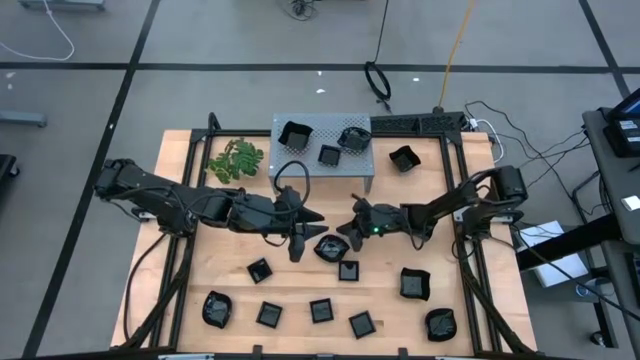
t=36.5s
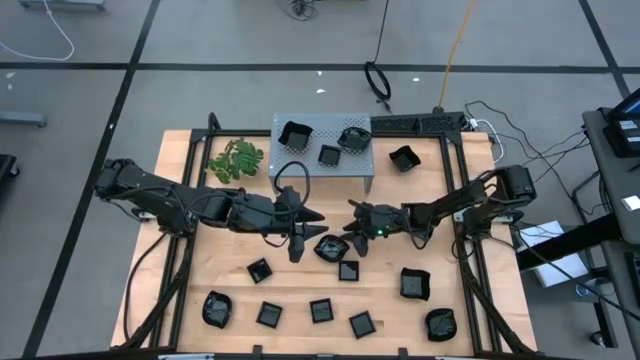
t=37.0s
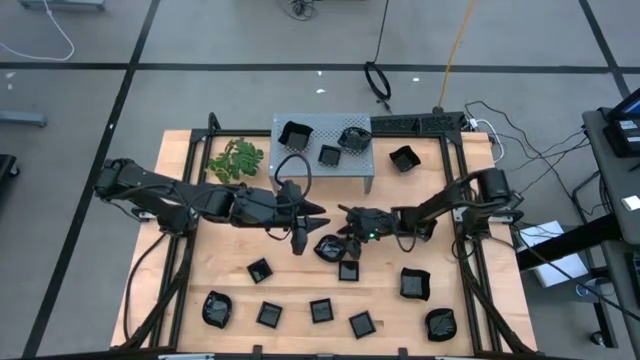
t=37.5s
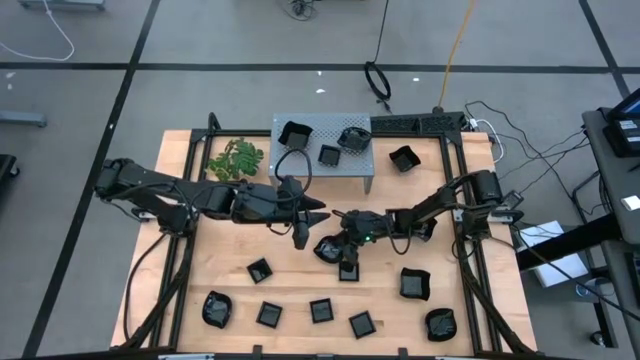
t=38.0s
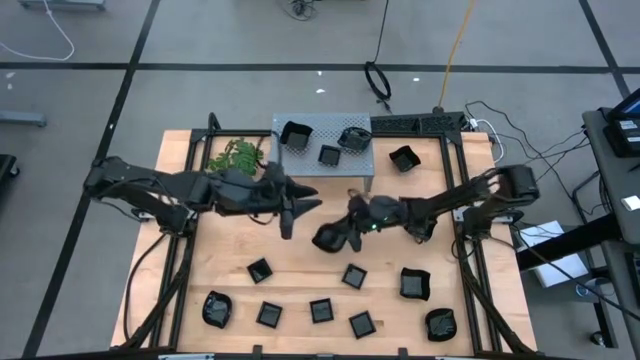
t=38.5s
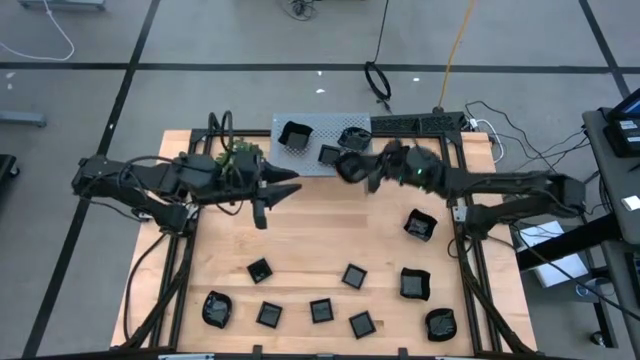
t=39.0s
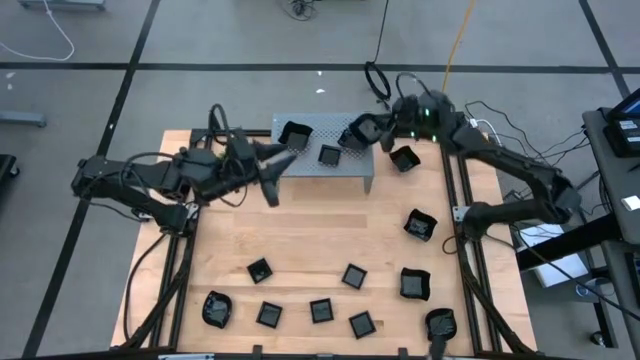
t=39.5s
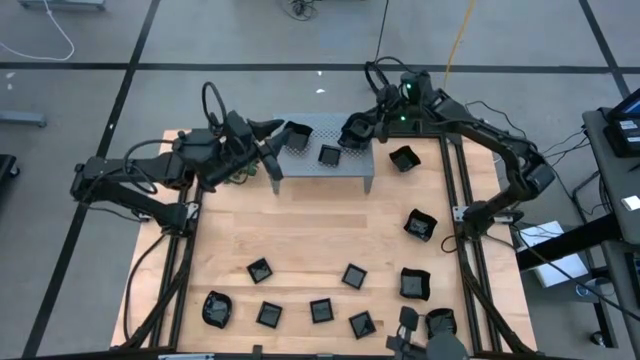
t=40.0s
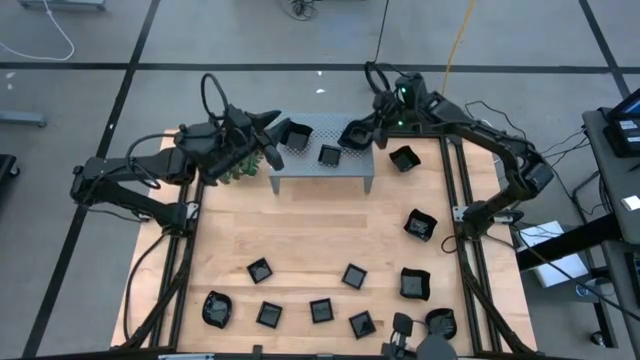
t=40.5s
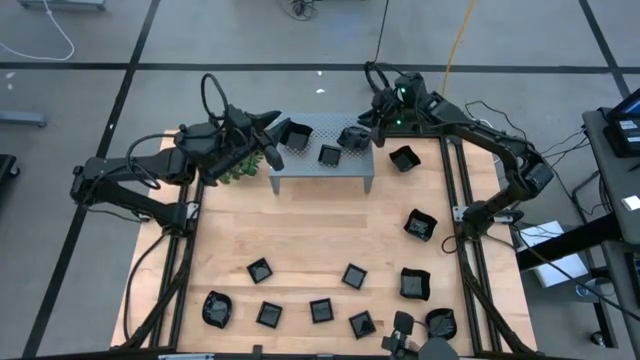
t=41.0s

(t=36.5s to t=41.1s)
Task: Pick & Place Mini shaped plates
Stack the black leaf-shaped plate on top of the black leaf-shaped plate on the shelf

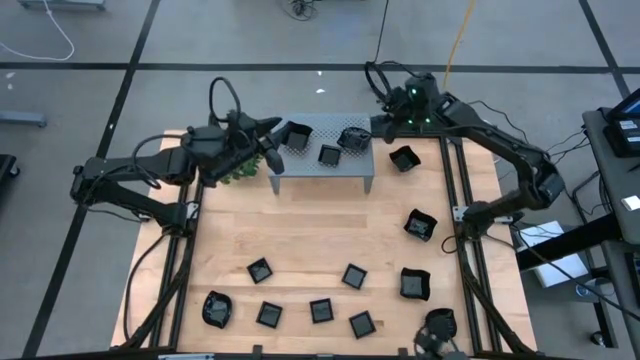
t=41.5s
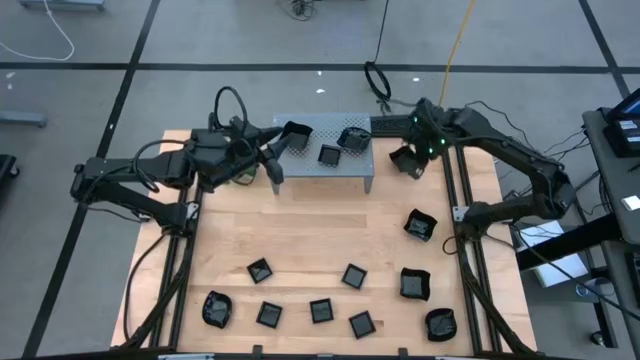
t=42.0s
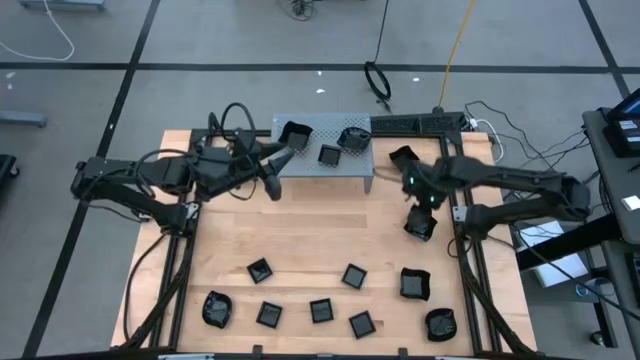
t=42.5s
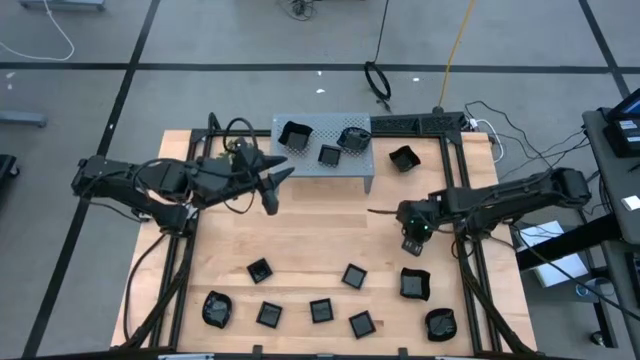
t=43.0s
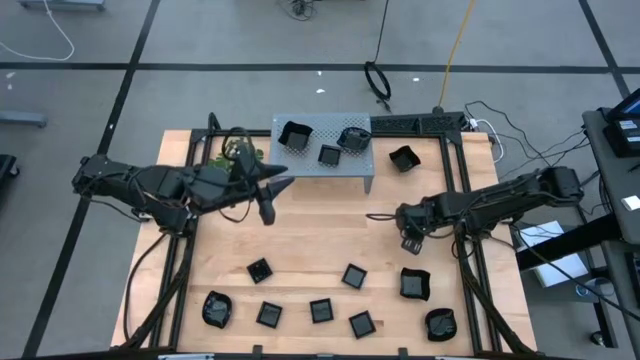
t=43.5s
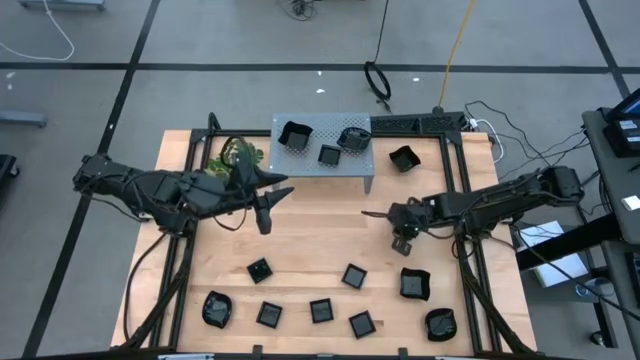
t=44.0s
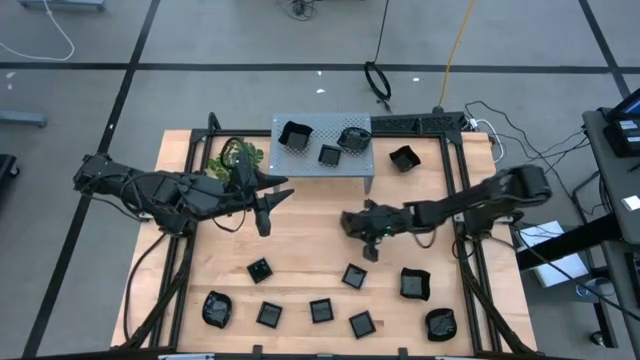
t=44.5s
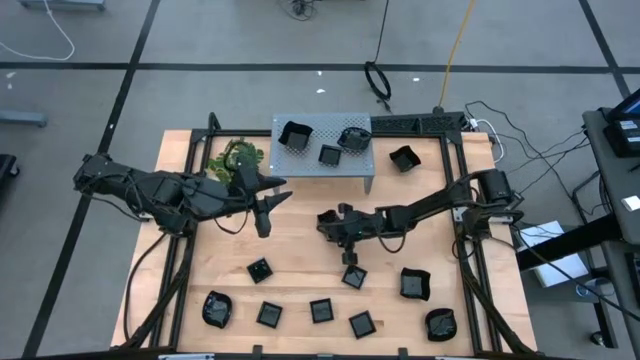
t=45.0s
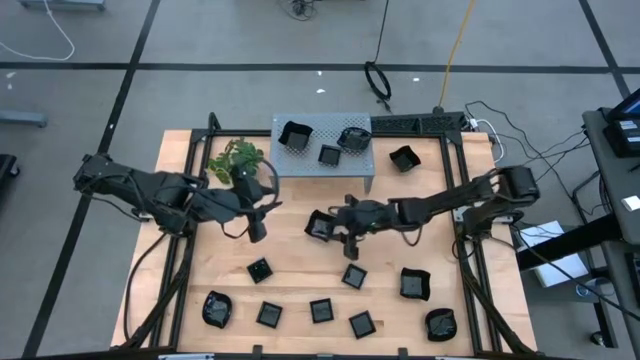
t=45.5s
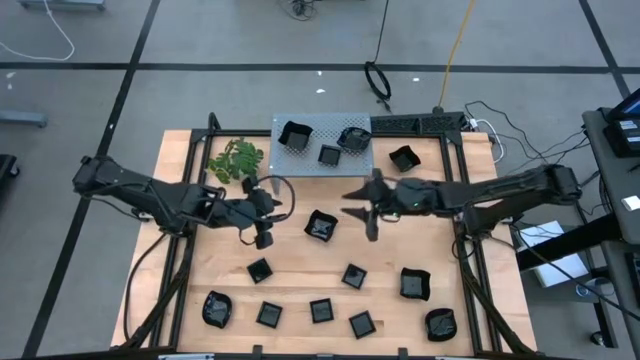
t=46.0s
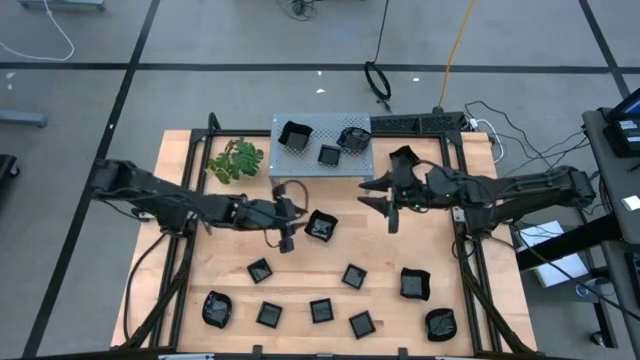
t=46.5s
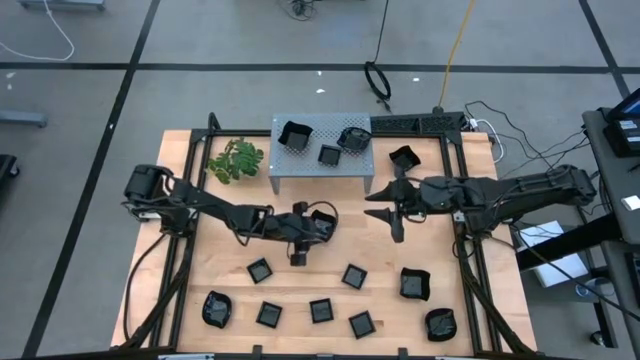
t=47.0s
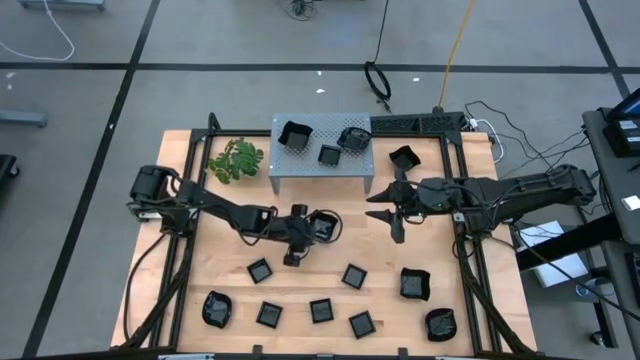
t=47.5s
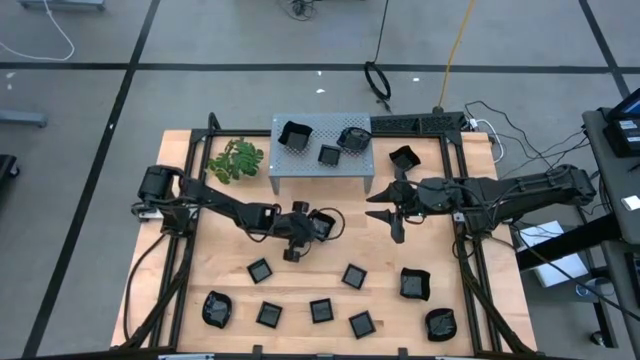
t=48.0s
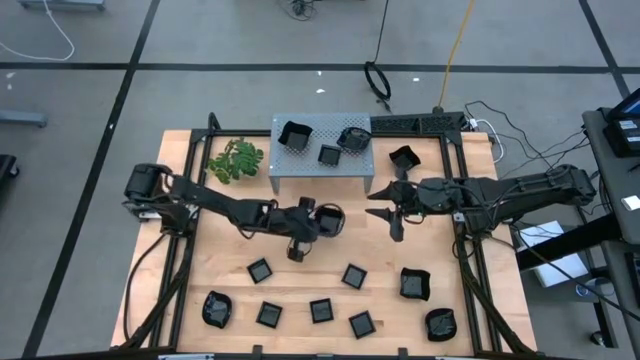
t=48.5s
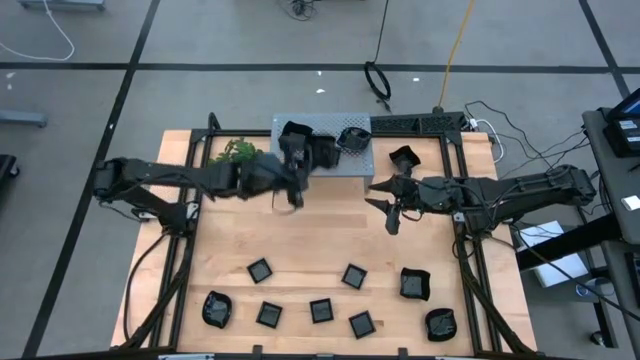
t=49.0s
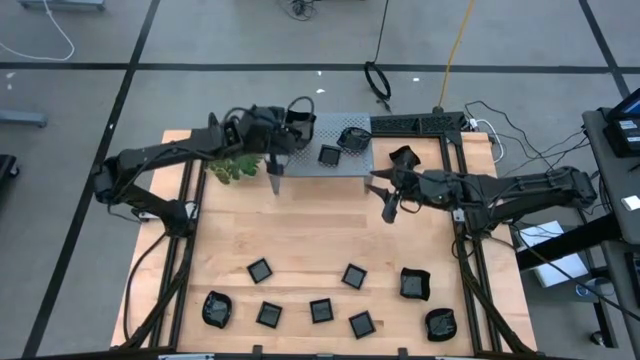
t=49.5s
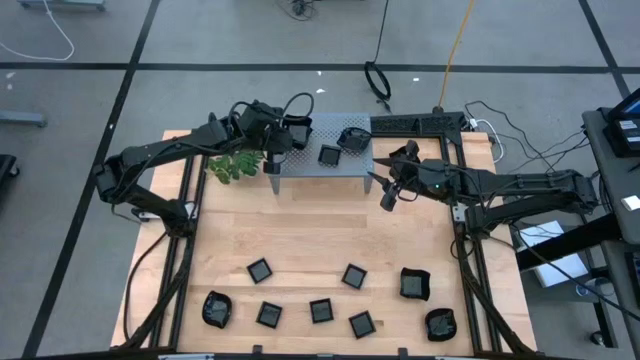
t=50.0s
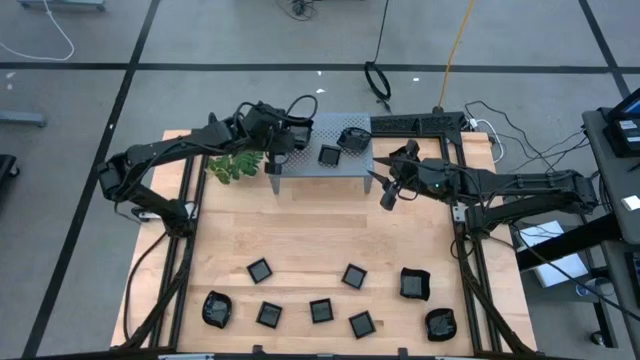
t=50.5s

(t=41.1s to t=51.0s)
Stack the black distorted square plate on top of the black distorted square plate on the shelf

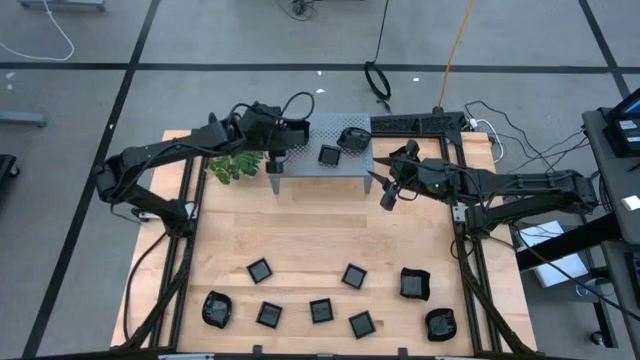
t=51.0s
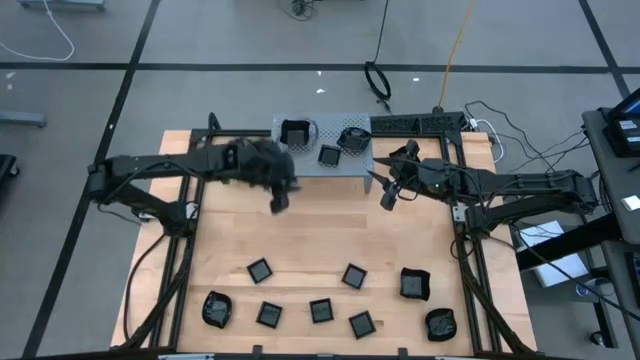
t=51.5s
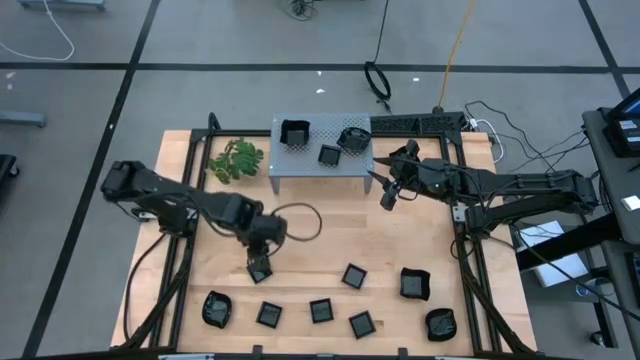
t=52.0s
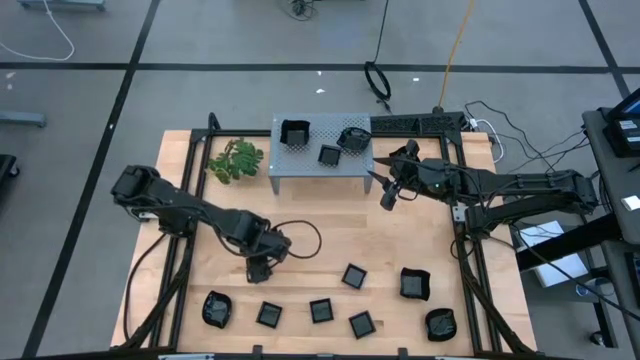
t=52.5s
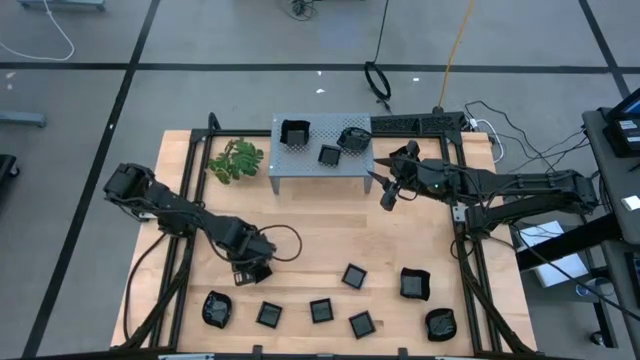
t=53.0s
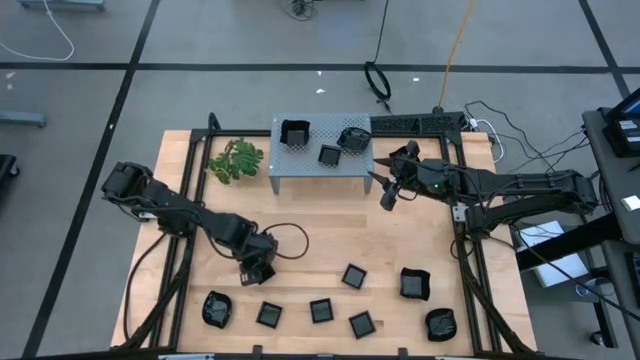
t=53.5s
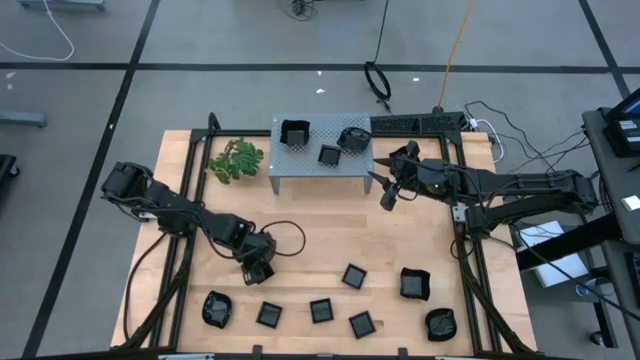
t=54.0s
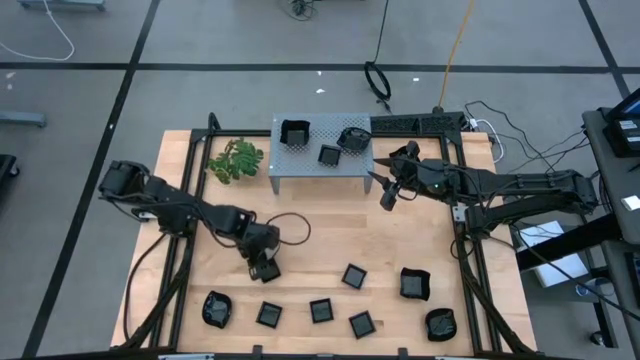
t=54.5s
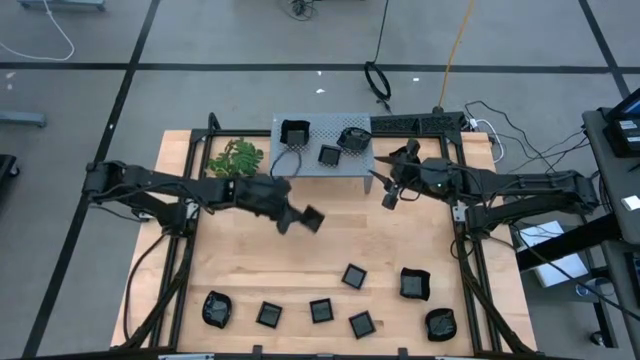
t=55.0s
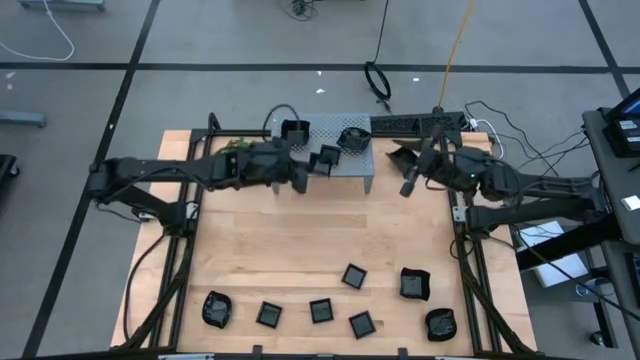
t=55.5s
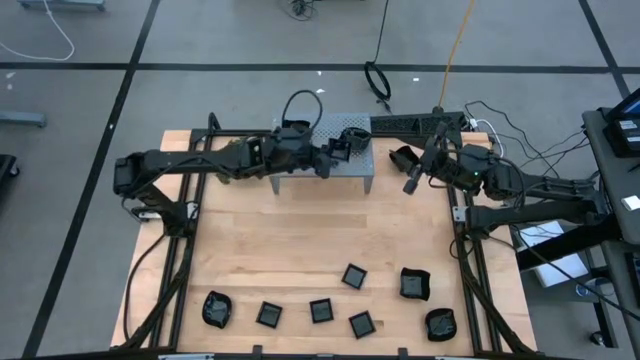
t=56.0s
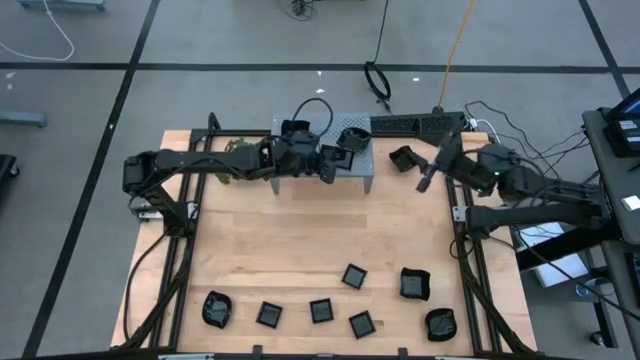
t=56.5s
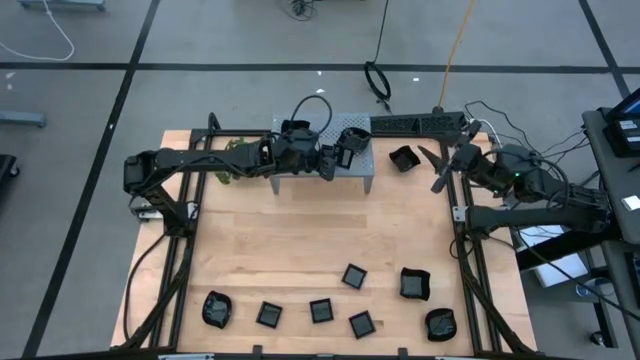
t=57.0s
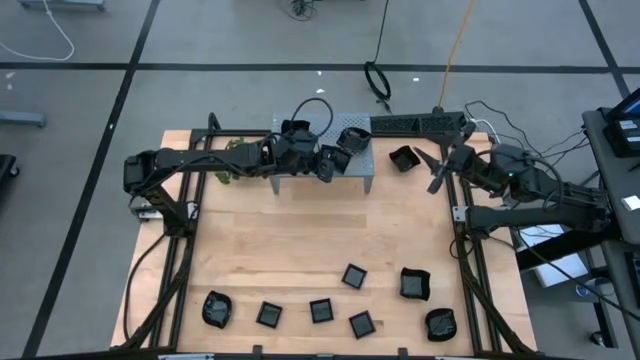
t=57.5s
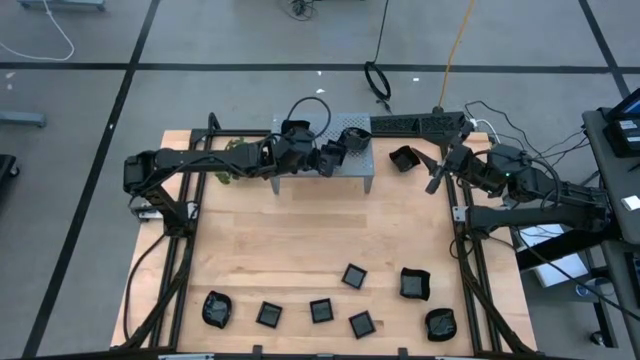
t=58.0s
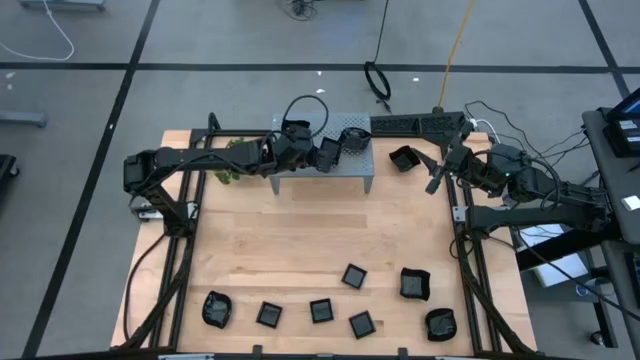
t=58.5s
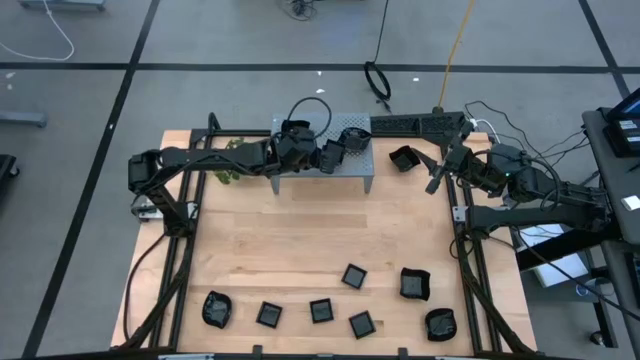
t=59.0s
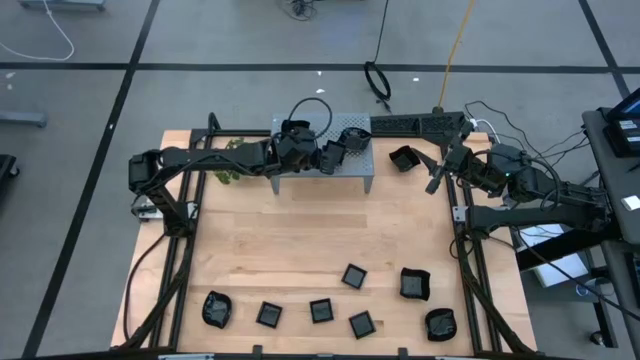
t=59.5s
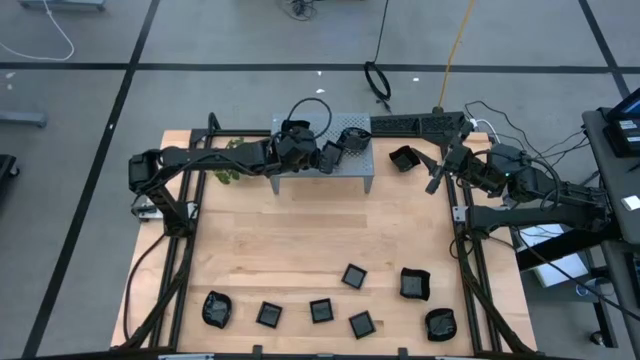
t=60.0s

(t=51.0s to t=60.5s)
Stack the black square plate on top of the black square plate on the shelf
